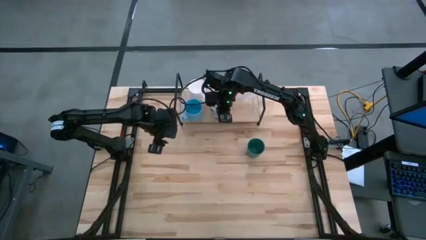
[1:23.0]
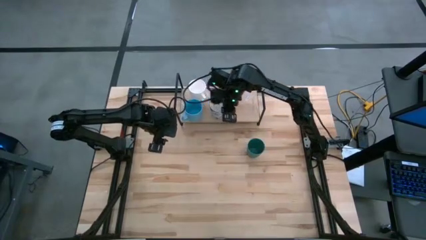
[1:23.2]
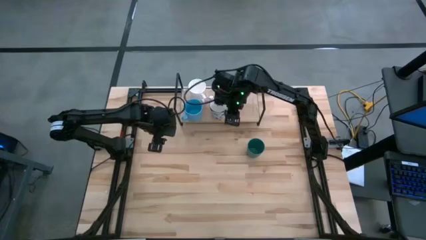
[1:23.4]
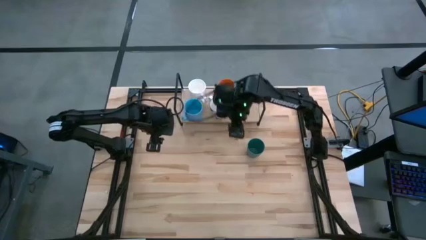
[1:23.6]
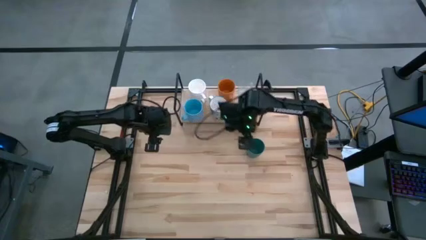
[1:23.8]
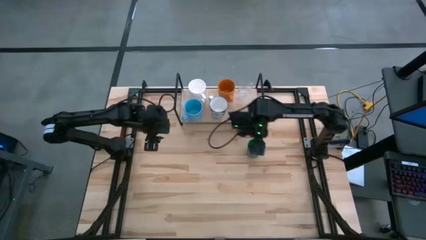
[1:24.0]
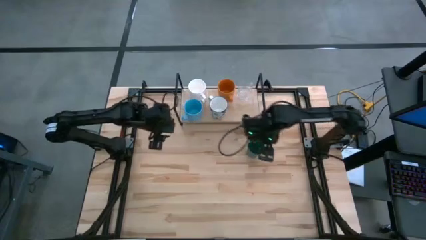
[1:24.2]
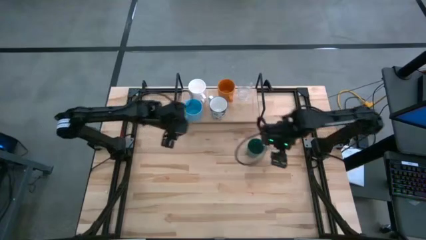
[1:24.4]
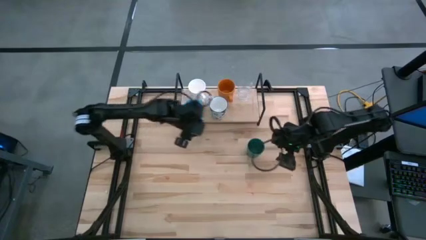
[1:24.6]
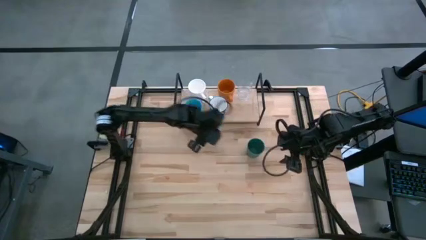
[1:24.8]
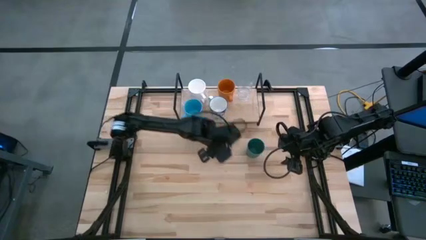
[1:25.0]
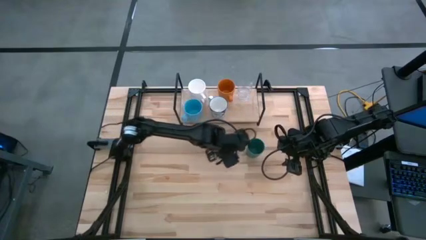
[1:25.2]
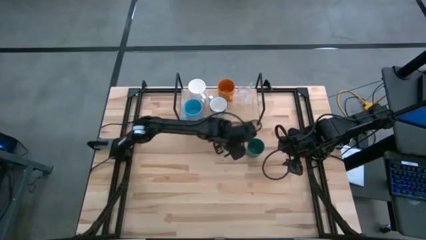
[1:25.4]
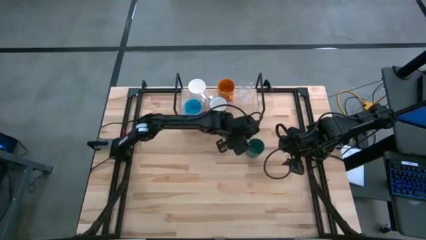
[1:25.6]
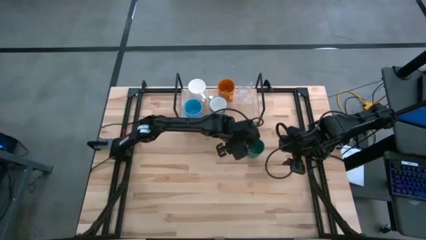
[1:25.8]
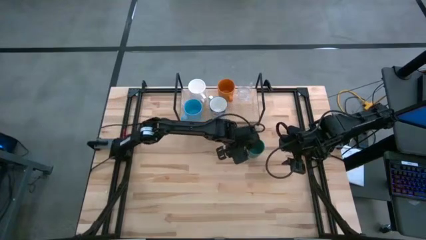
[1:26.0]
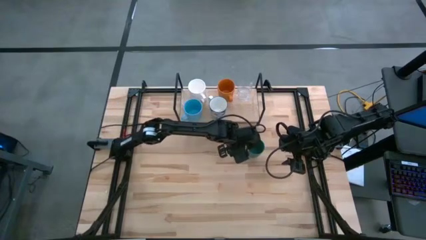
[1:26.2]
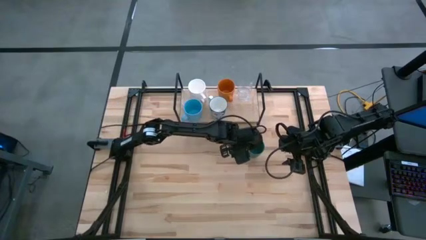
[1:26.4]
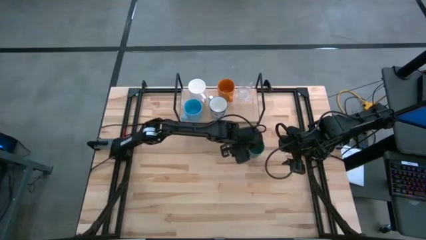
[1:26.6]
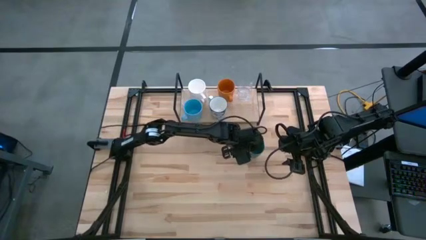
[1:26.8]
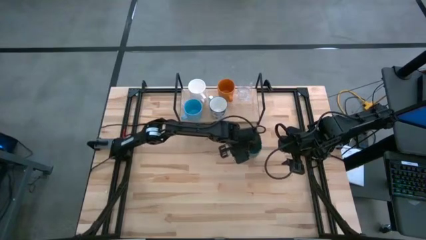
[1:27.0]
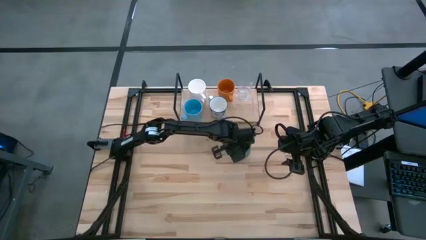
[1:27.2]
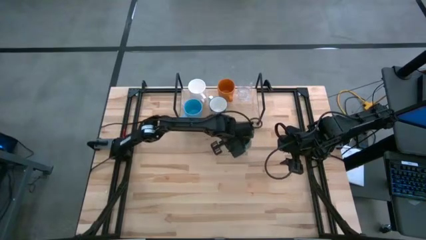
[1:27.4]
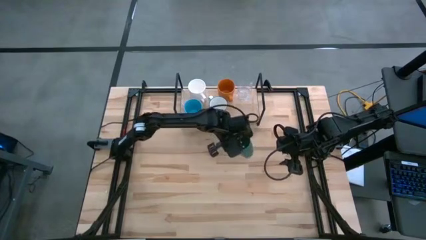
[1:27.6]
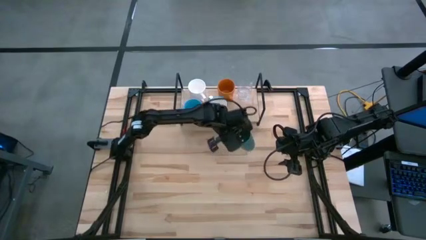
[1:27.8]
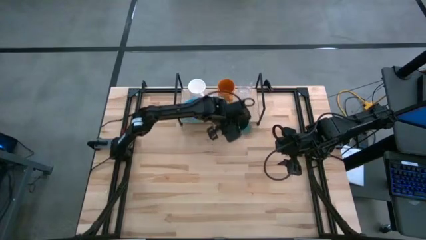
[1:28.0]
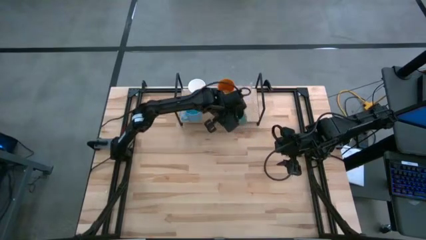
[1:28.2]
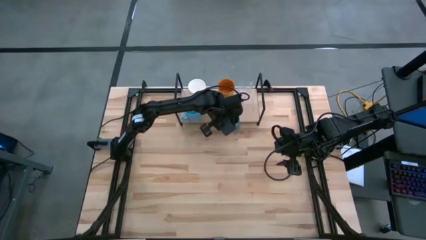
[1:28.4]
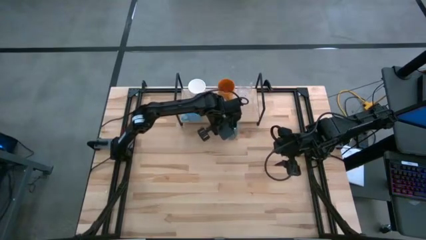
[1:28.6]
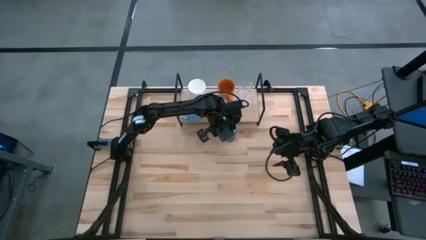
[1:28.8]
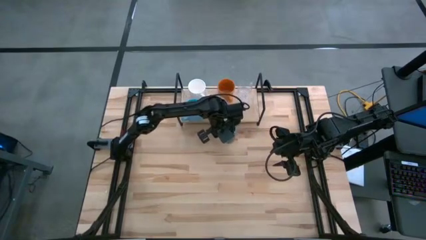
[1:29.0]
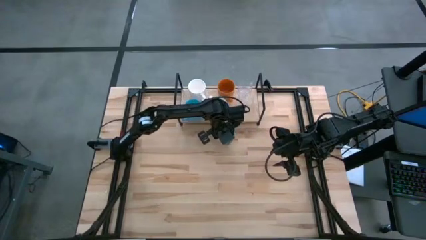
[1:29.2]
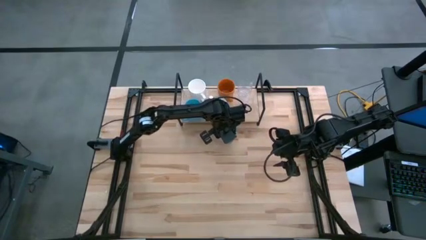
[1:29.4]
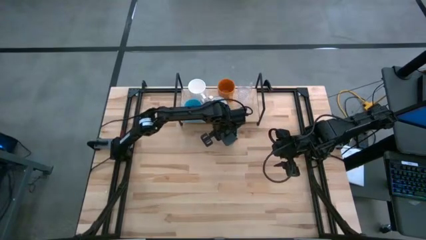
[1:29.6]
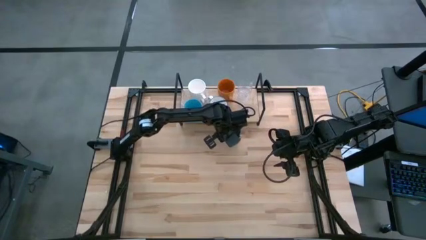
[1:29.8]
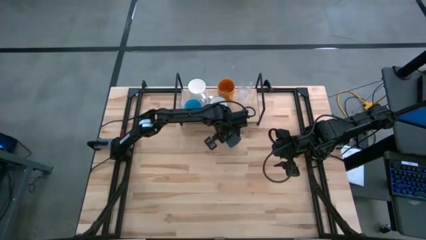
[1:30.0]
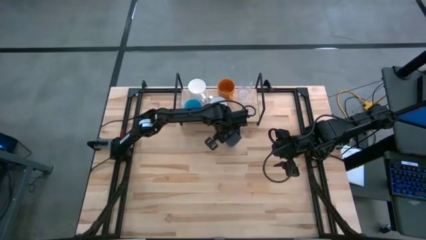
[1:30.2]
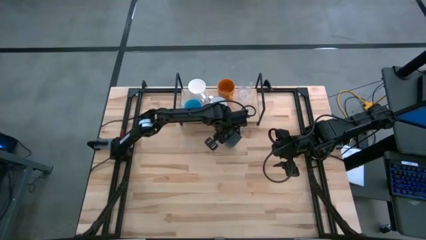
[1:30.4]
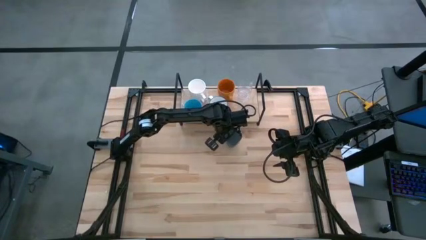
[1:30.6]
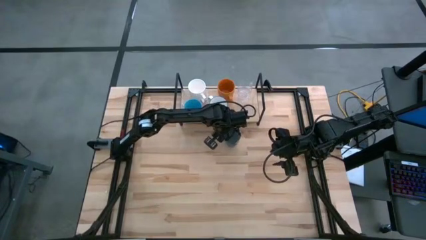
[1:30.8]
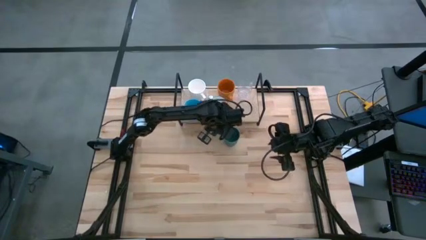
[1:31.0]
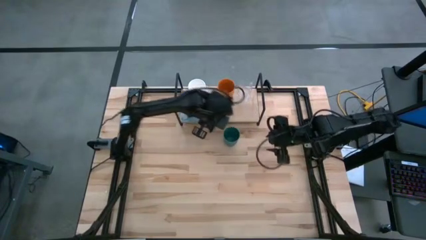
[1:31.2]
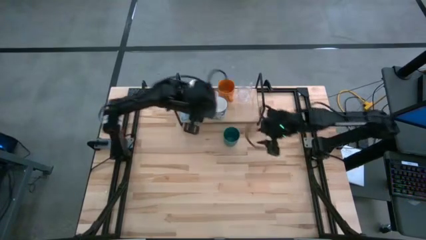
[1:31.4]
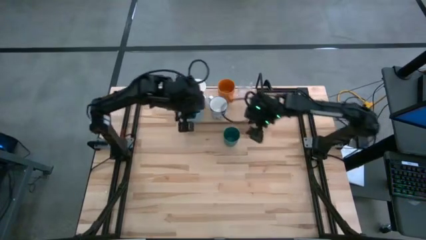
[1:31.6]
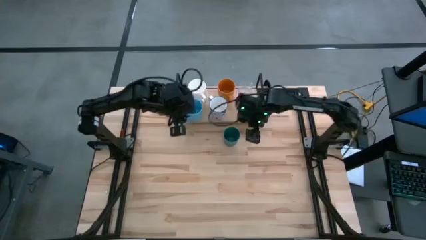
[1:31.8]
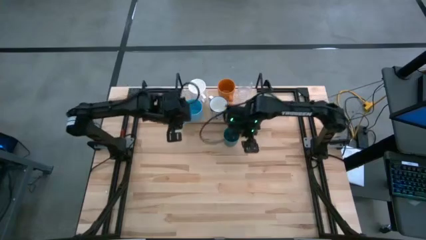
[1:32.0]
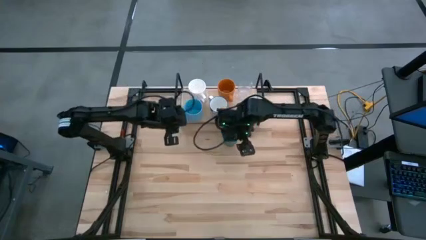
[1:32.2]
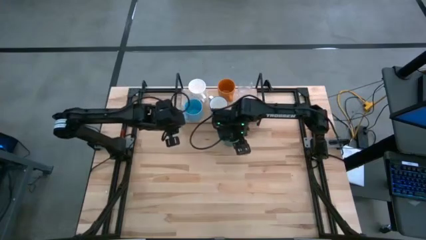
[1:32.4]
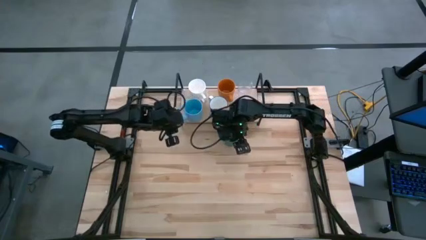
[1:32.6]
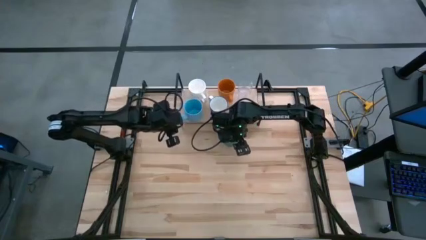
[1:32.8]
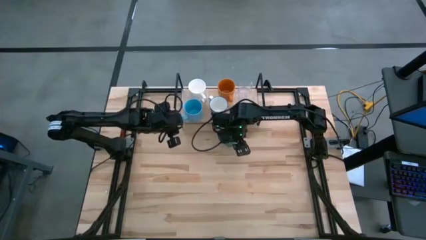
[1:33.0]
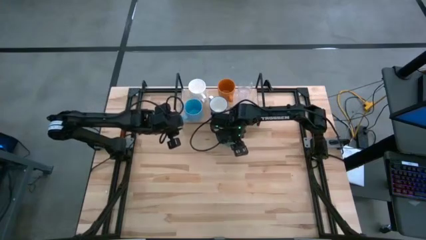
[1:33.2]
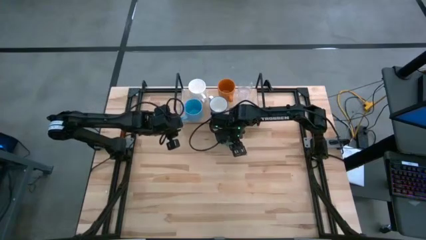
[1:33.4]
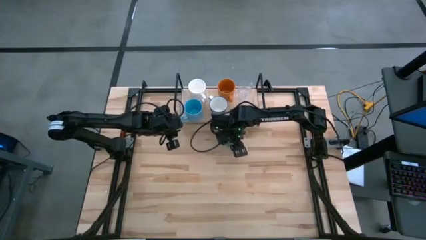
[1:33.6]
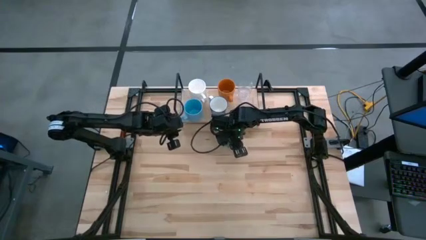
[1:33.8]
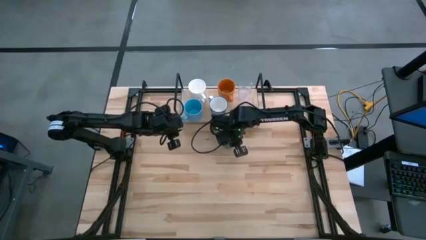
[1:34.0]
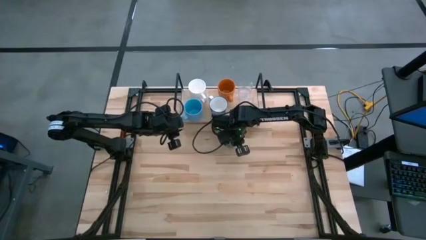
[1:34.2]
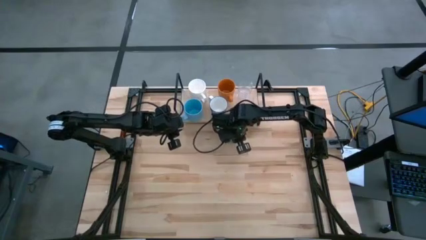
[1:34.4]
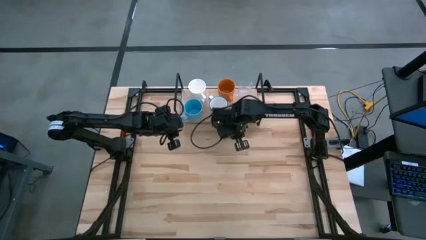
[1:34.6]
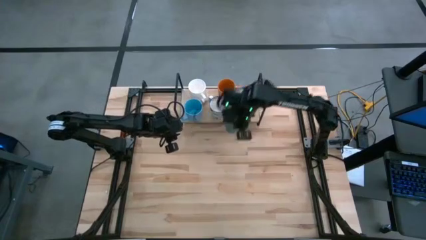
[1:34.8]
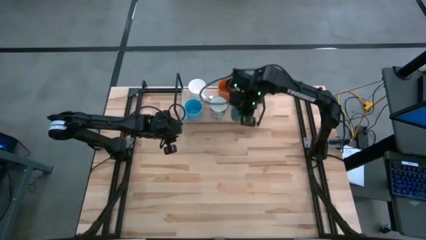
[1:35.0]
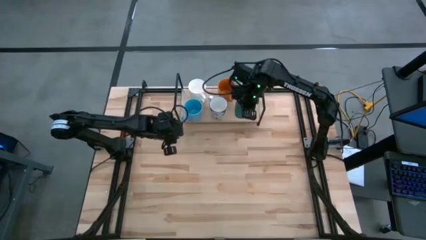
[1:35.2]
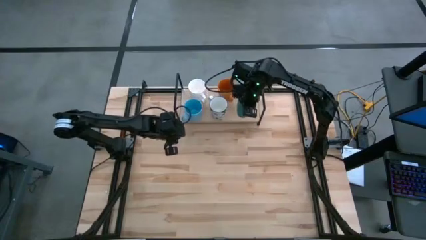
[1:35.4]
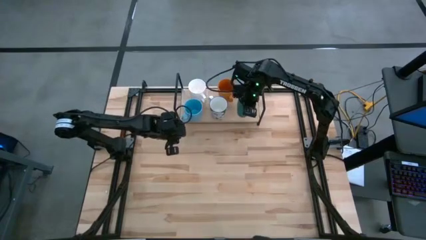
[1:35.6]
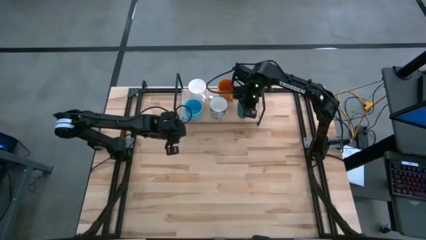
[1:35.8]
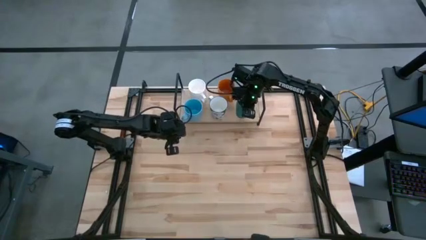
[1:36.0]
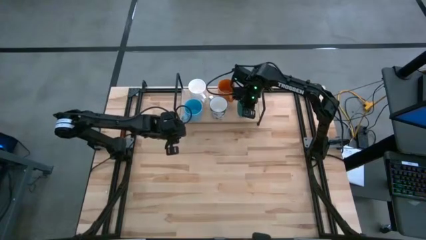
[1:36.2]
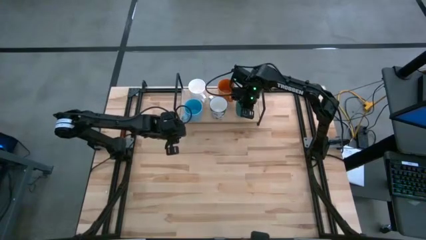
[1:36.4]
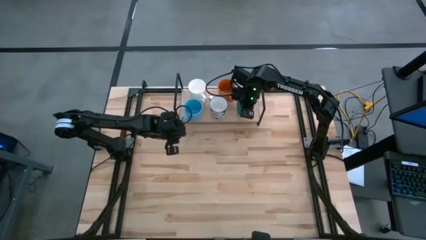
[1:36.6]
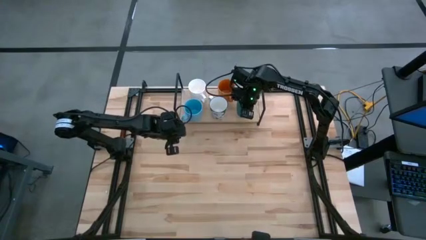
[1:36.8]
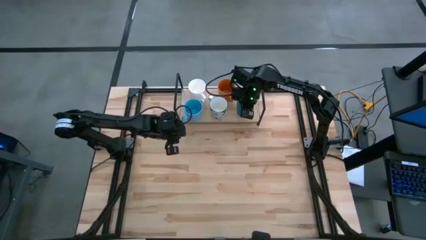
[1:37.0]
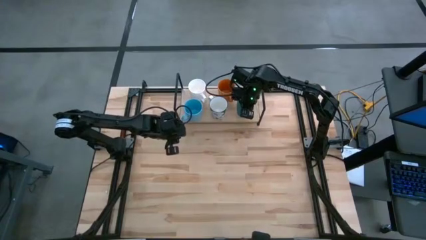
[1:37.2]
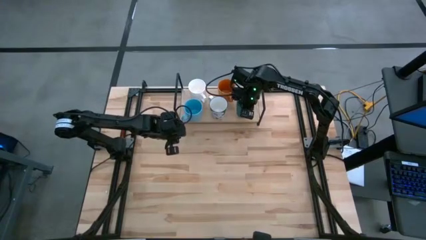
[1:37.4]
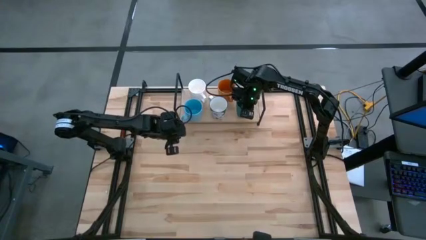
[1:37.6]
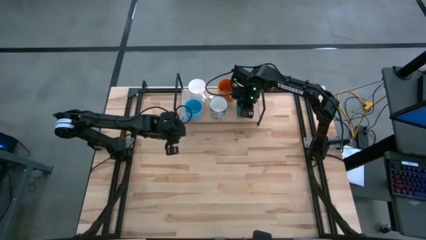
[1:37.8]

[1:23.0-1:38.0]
Task: Stack small to large cups/mugs on shelf
Put the green cup on the shelf
